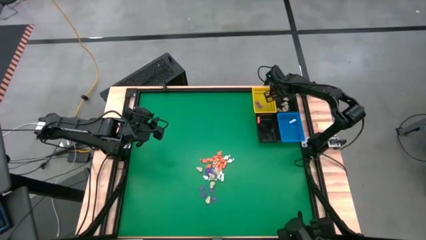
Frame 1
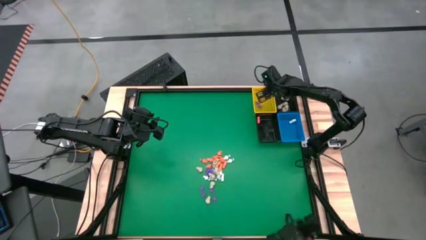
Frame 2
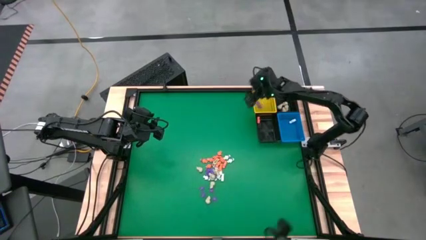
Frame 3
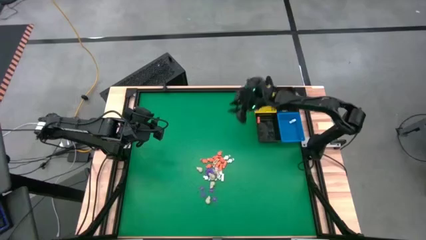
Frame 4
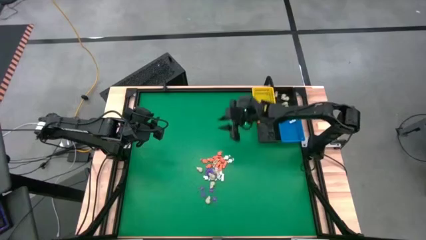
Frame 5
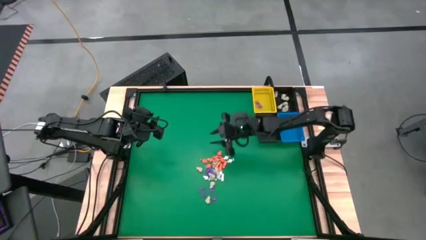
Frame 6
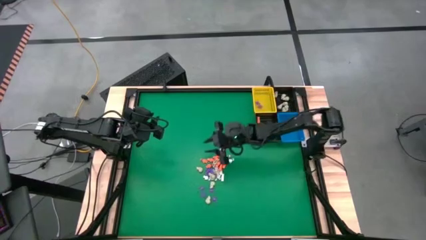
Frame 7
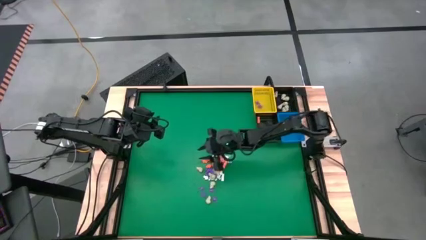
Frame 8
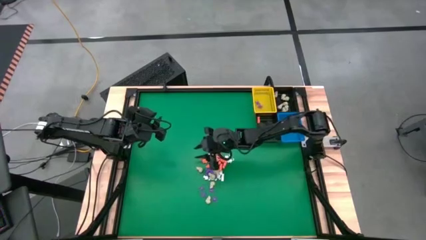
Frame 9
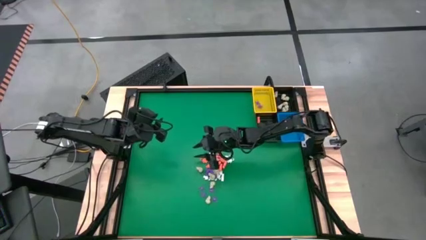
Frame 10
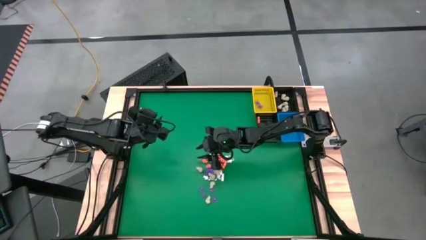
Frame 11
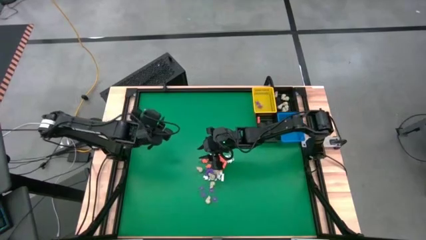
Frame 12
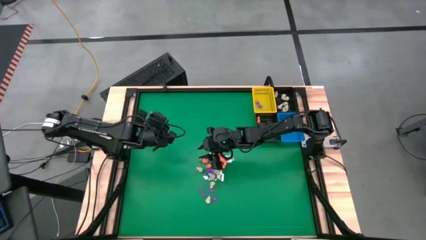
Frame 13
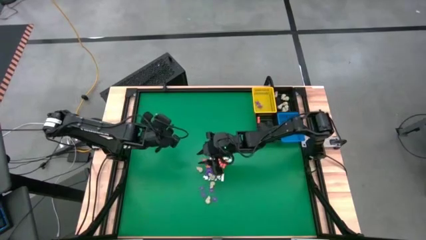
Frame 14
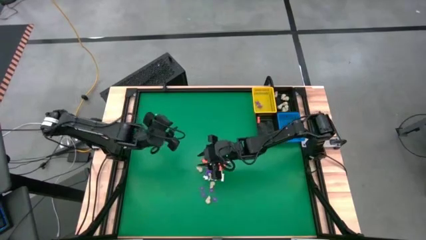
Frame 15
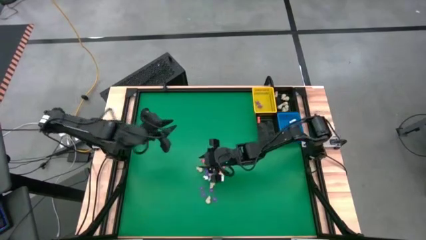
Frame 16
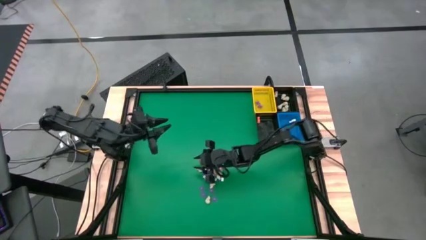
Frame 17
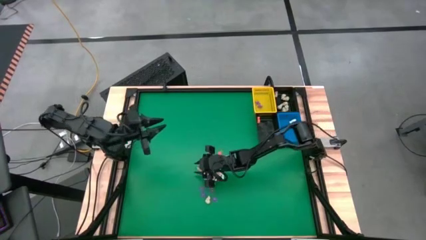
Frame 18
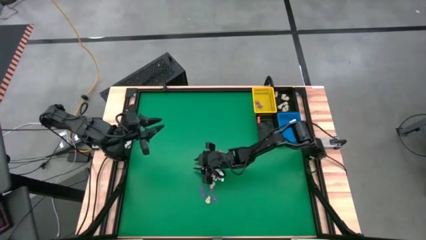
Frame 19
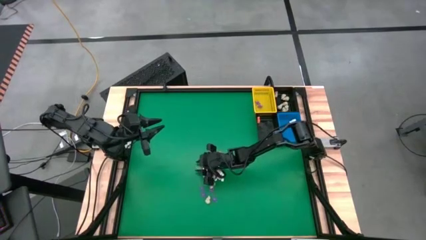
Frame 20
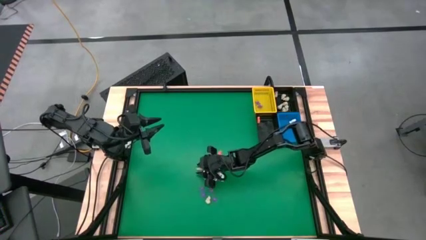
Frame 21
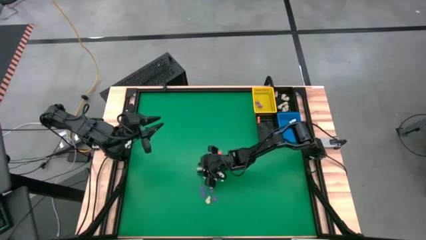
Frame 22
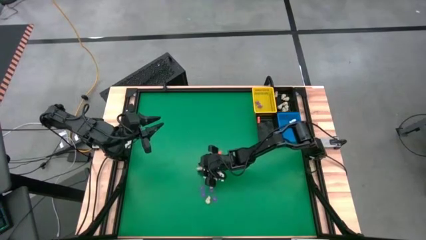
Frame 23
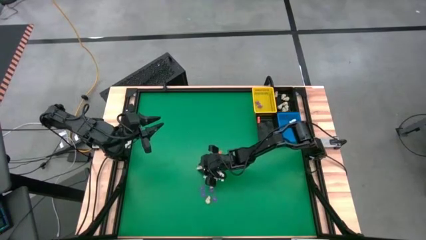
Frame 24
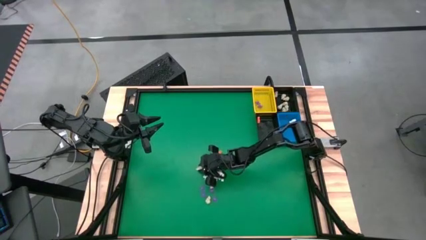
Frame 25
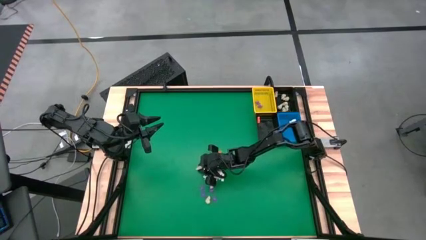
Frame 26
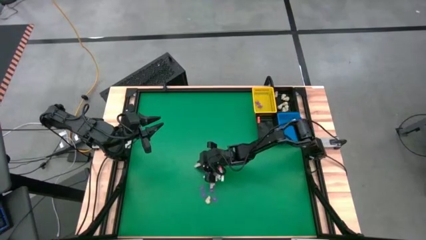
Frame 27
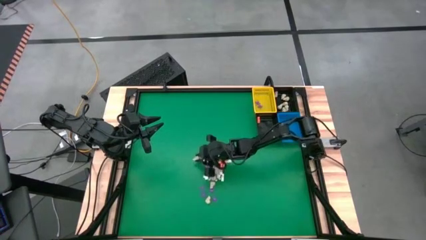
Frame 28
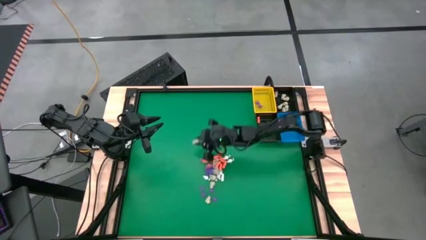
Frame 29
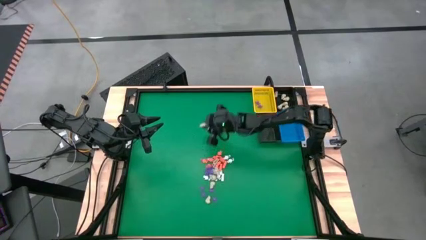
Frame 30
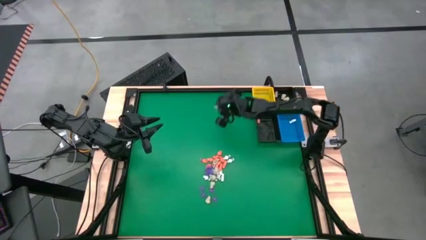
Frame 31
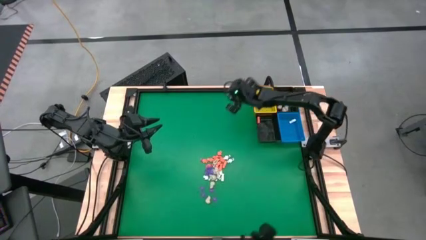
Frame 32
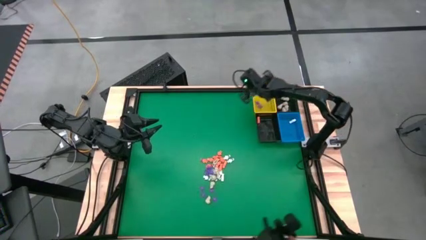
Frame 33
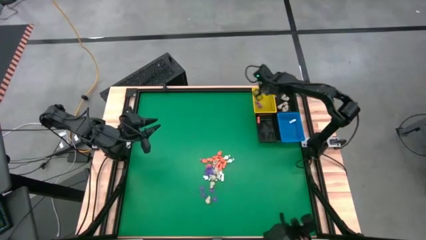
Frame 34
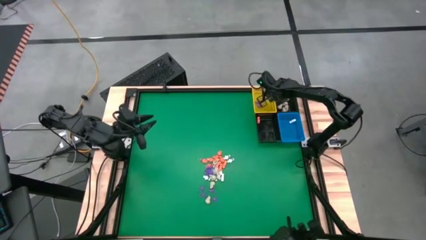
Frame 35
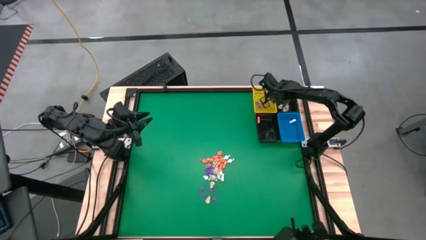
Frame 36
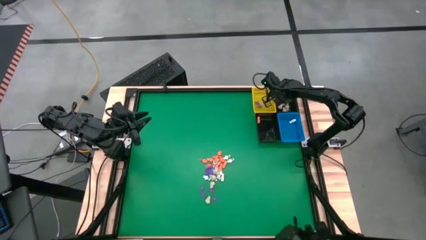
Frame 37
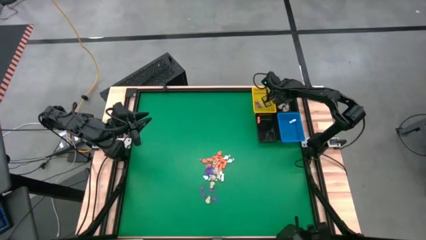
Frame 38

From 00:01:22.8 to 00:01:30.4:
Task: Sort Halloween decoration
Put the gray skull toy into the top black basket

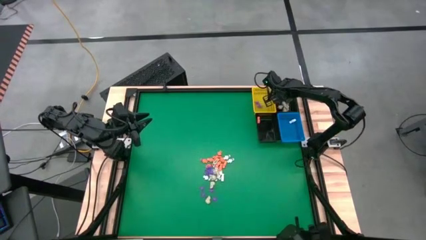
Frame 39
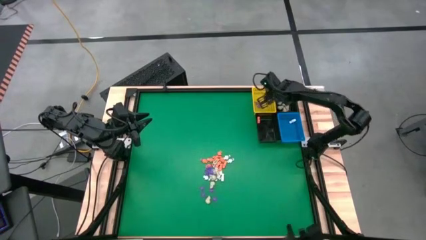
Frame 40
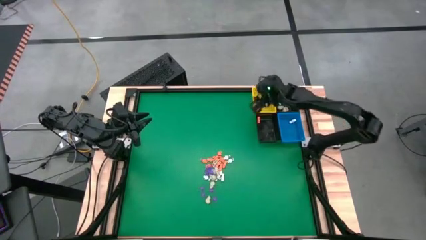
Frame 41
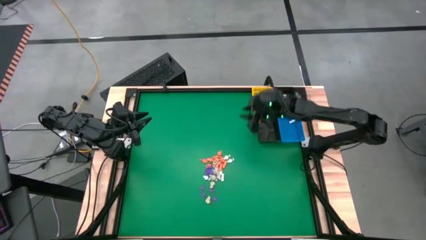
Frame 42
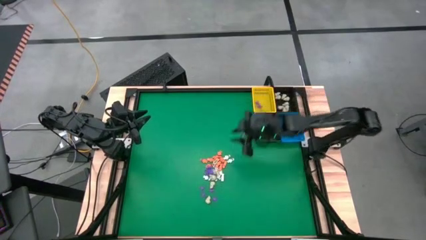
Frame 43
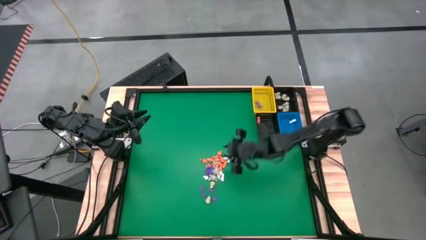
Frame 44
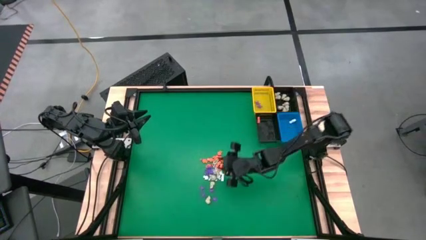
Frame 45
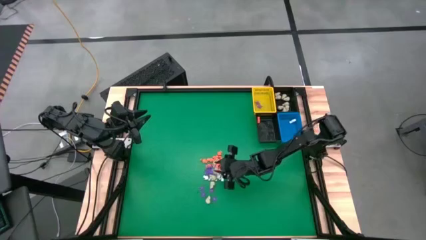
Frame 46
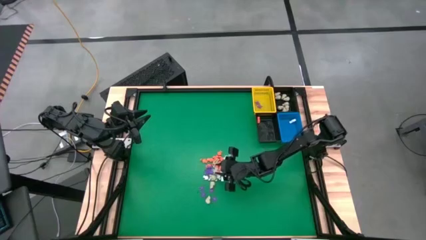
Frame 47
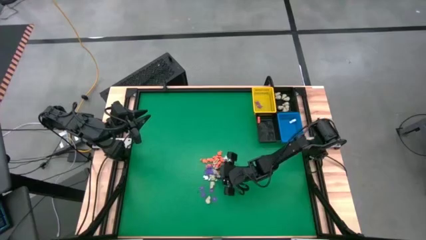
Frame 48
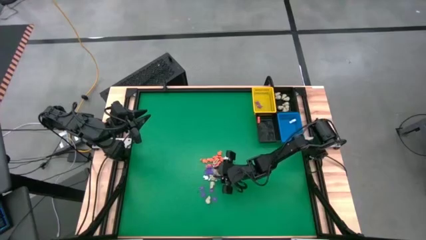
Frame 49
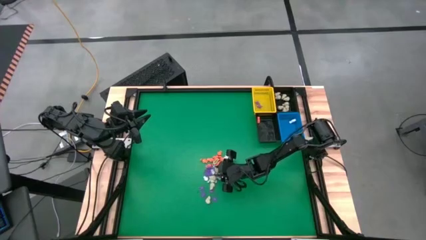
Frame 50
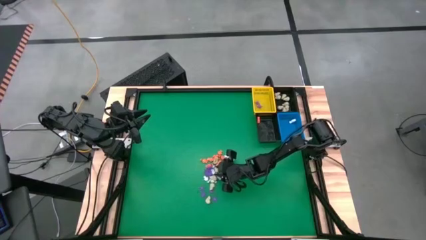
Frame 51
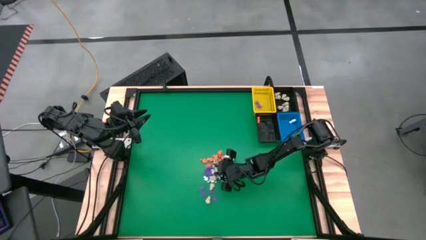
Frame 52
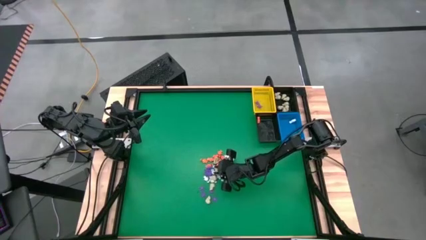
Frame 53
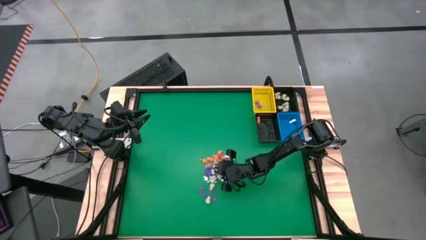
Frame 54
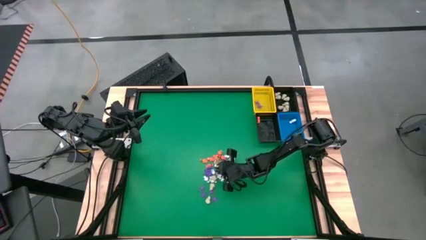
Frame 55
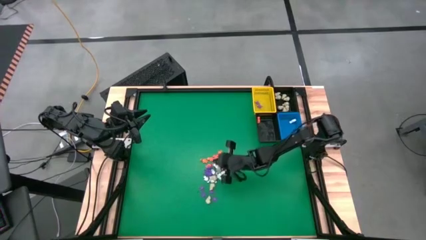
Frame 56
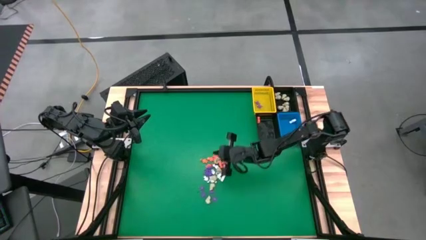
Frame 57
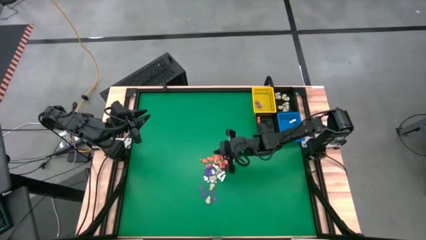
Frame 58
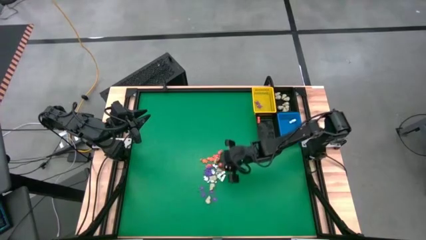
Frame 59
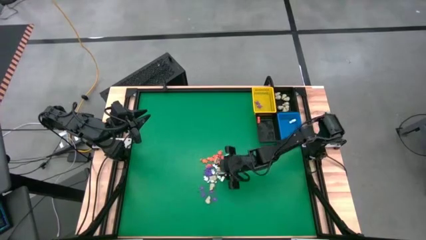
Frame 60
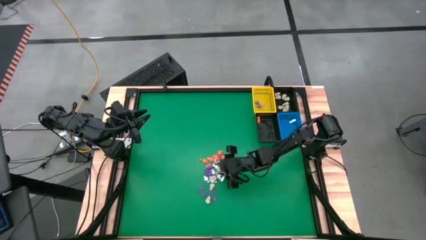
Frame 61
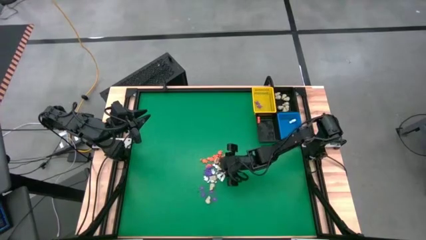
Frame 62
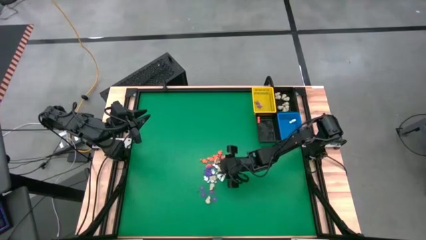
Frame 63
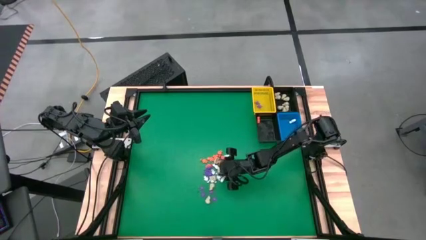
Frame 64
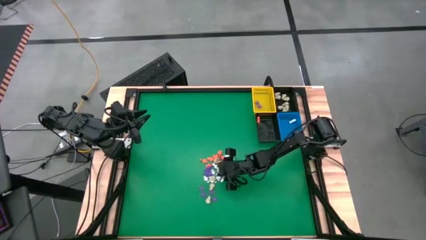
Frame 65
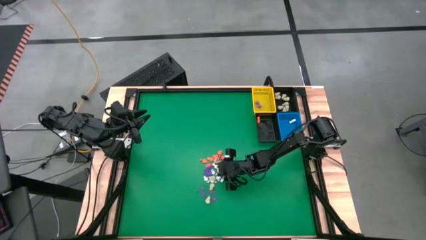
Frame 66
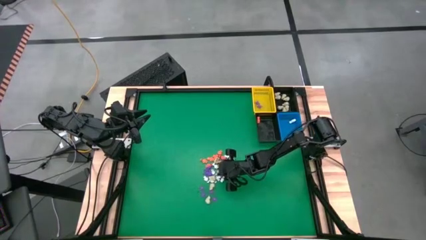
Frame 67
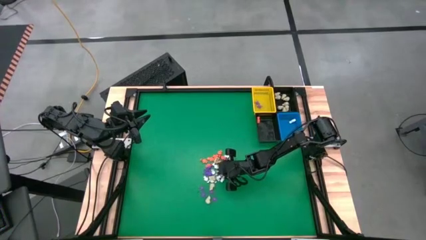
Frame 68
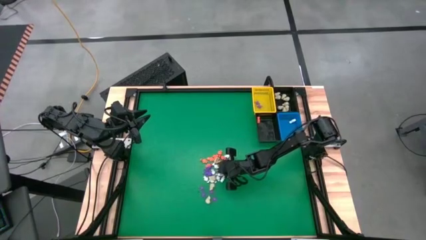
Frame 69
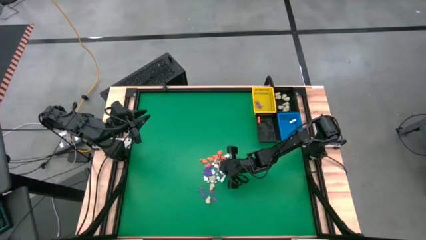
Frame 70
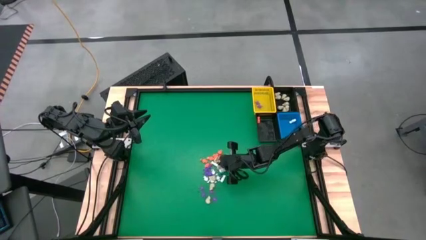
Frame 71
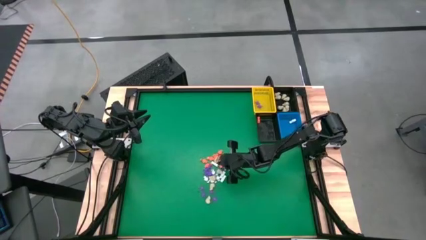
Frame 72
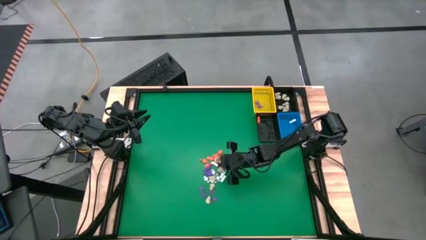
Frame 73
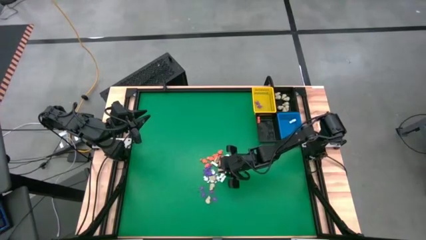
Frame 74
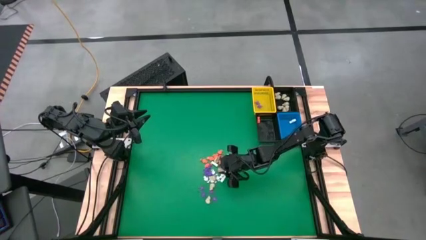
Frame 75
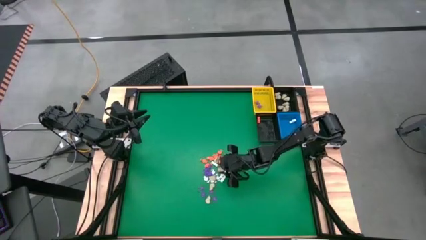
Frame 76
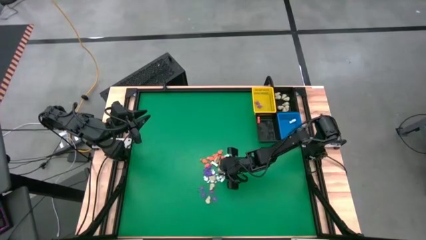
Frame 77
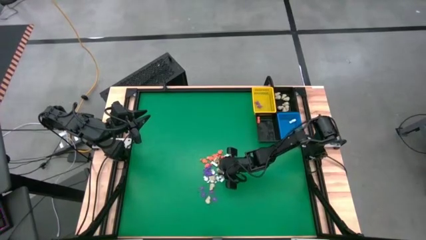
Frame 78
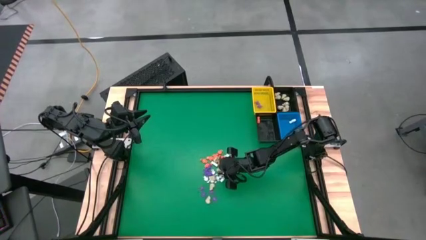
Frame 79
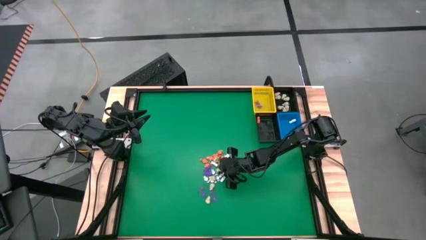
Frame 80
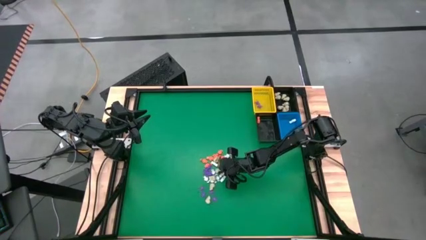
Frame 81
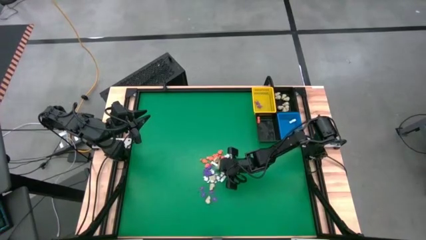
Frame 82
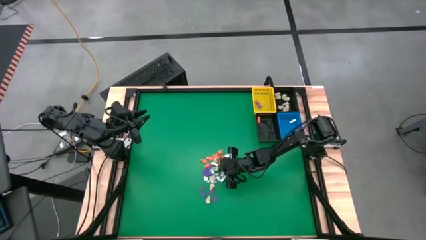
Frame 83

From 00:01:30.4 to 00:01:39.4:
Put the gray skull toy into the top black basket
